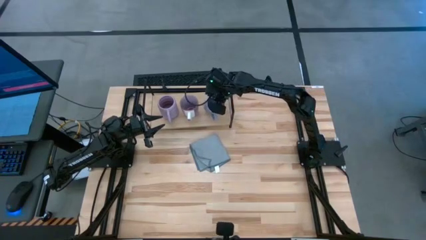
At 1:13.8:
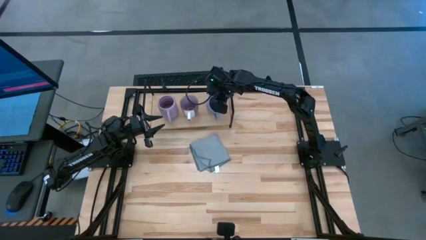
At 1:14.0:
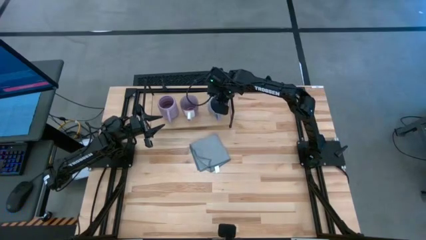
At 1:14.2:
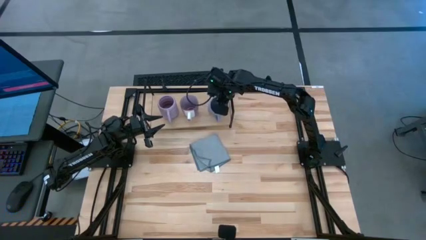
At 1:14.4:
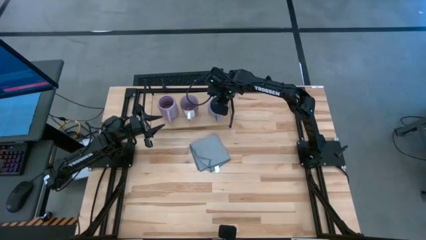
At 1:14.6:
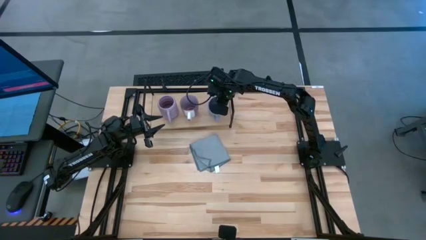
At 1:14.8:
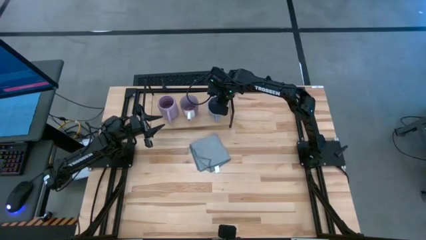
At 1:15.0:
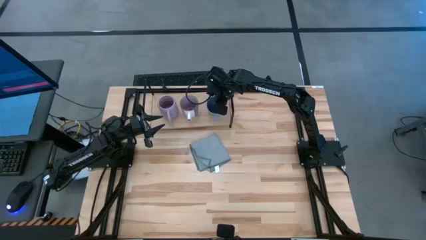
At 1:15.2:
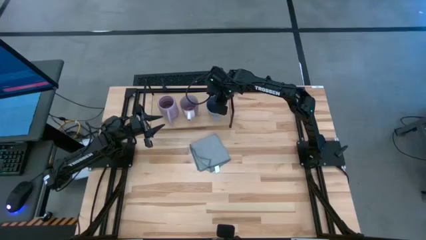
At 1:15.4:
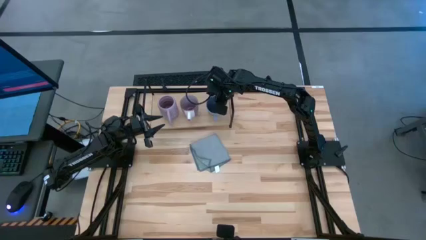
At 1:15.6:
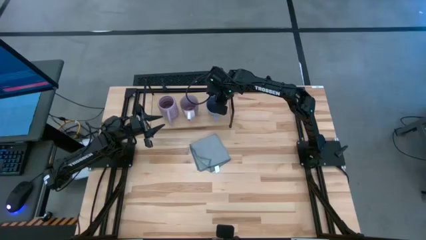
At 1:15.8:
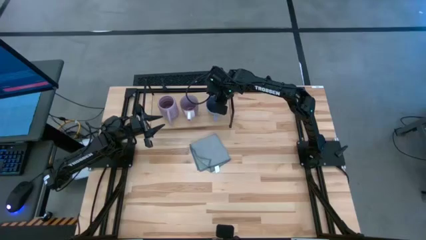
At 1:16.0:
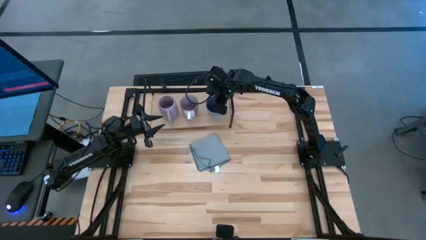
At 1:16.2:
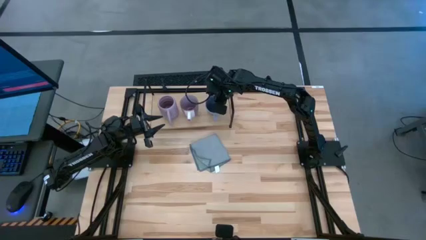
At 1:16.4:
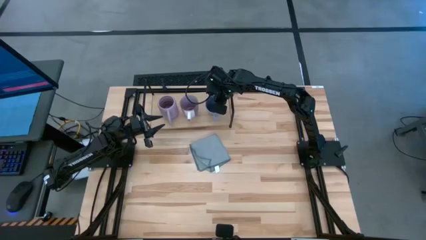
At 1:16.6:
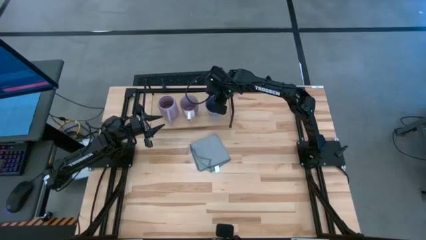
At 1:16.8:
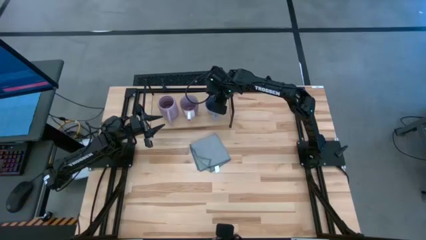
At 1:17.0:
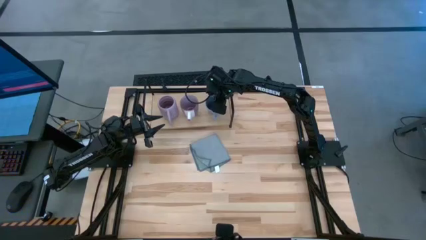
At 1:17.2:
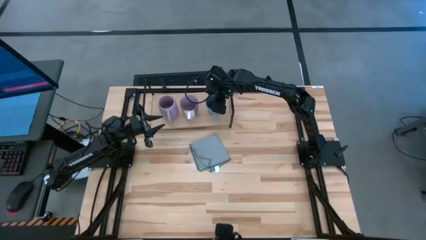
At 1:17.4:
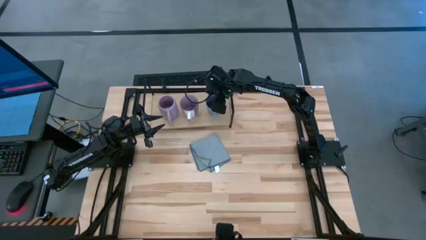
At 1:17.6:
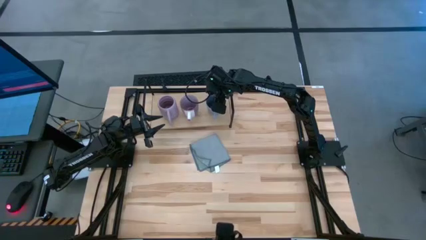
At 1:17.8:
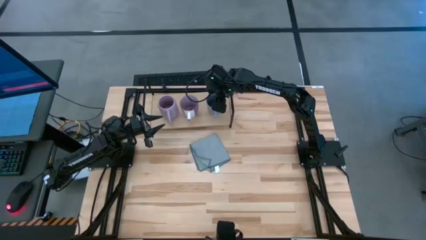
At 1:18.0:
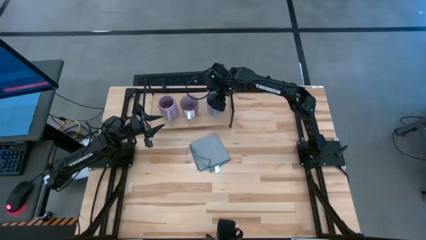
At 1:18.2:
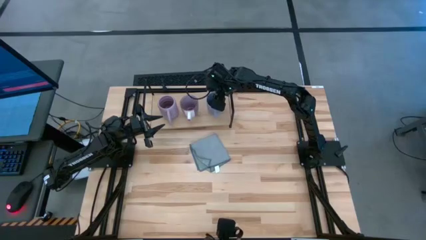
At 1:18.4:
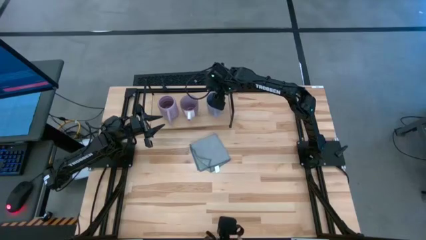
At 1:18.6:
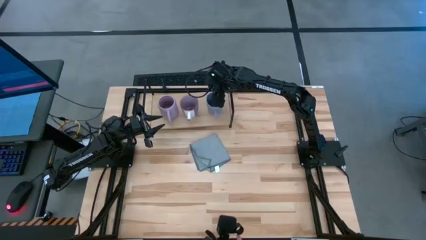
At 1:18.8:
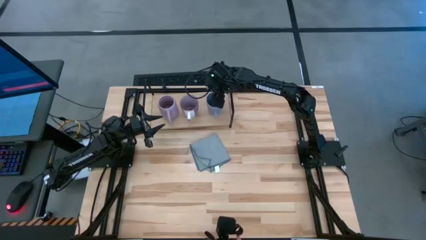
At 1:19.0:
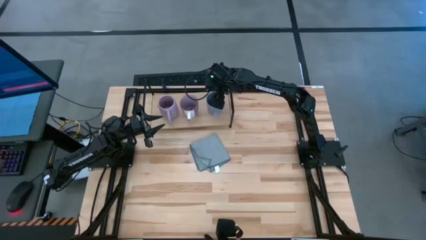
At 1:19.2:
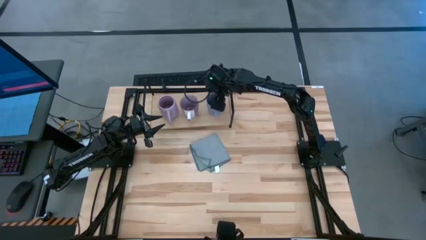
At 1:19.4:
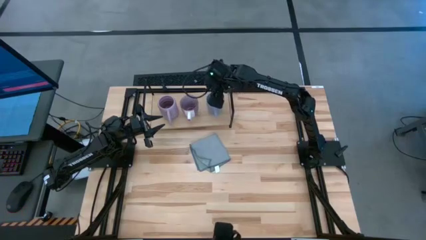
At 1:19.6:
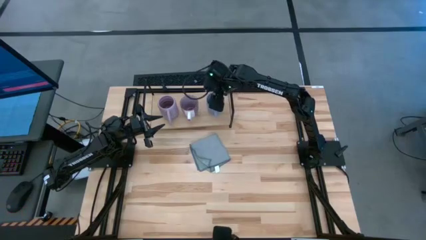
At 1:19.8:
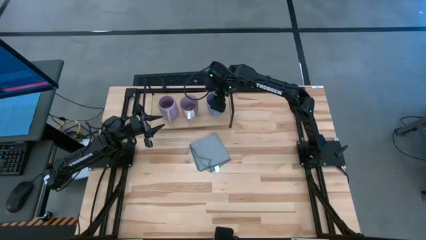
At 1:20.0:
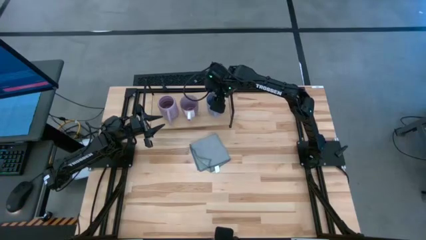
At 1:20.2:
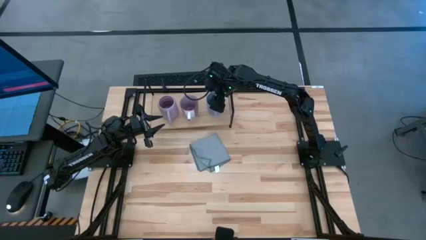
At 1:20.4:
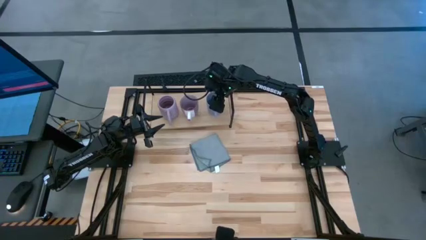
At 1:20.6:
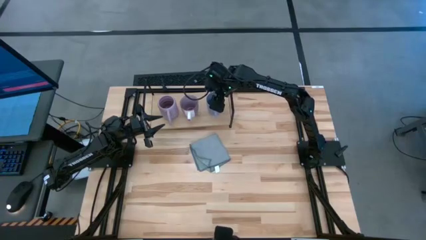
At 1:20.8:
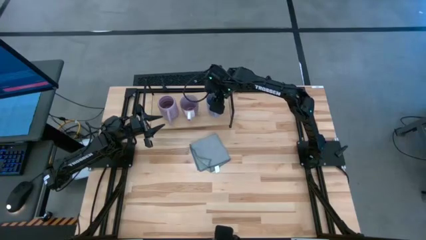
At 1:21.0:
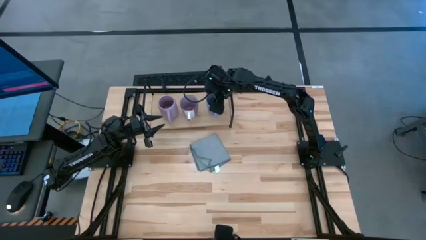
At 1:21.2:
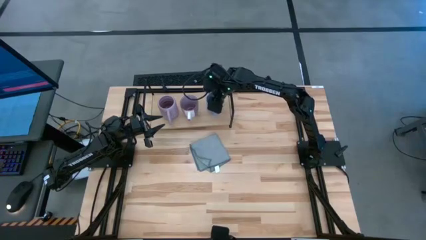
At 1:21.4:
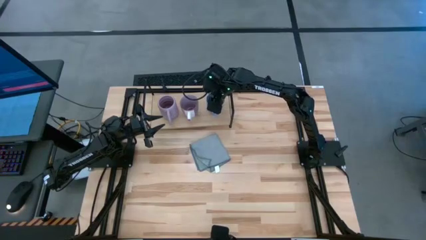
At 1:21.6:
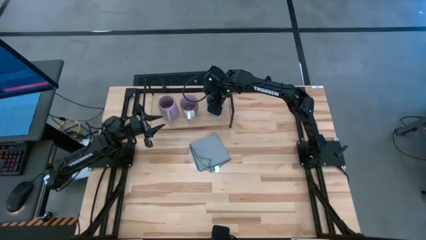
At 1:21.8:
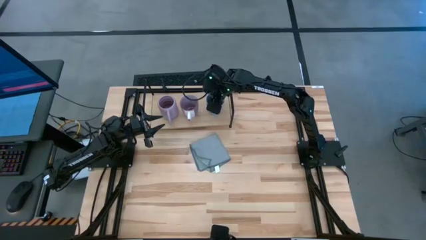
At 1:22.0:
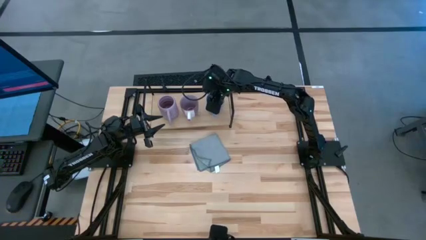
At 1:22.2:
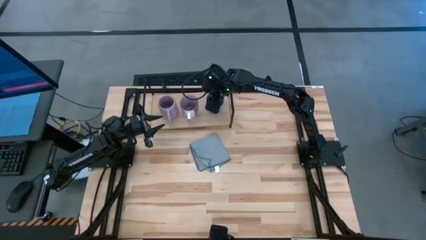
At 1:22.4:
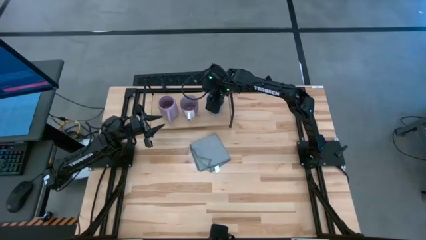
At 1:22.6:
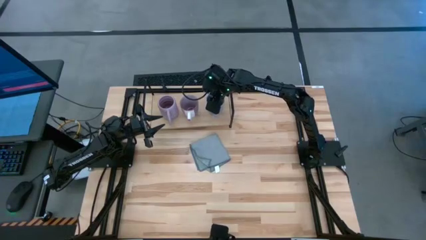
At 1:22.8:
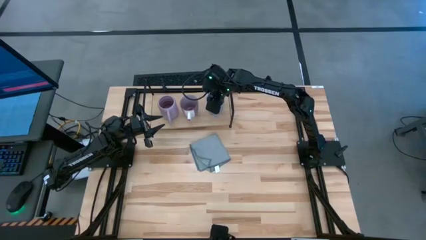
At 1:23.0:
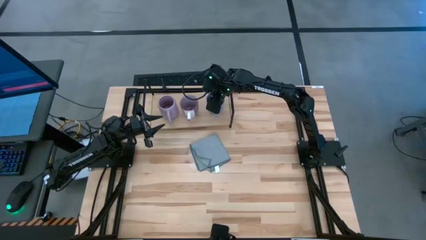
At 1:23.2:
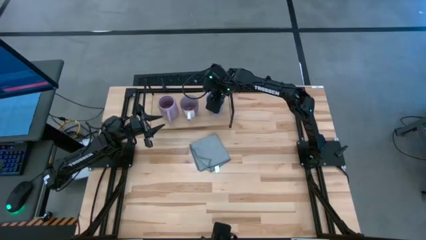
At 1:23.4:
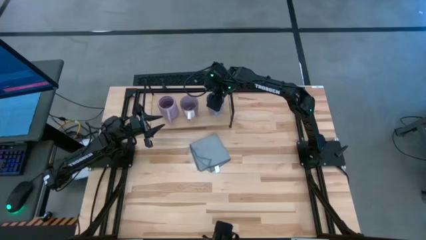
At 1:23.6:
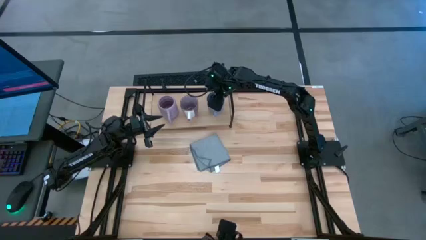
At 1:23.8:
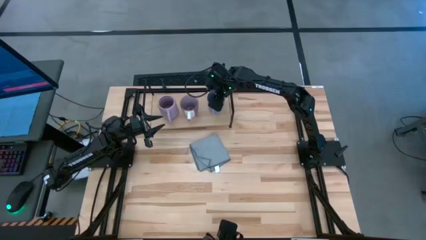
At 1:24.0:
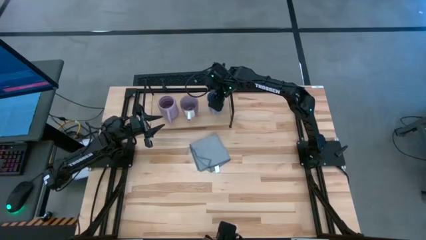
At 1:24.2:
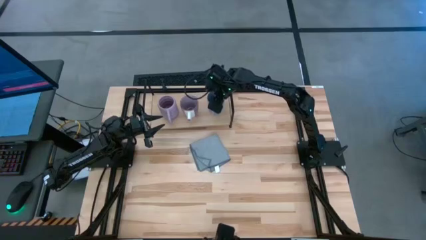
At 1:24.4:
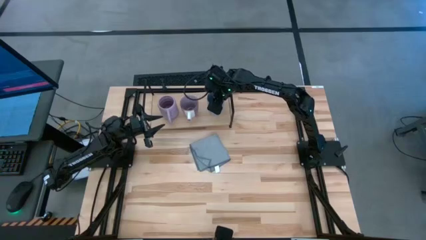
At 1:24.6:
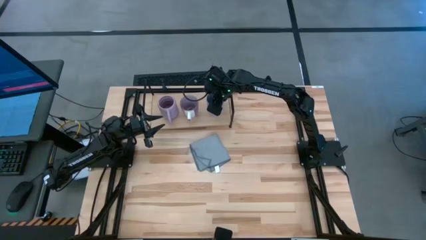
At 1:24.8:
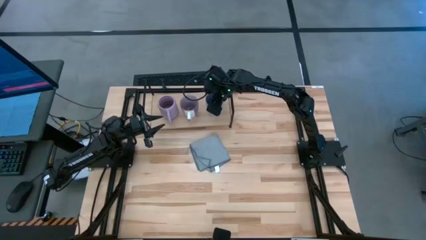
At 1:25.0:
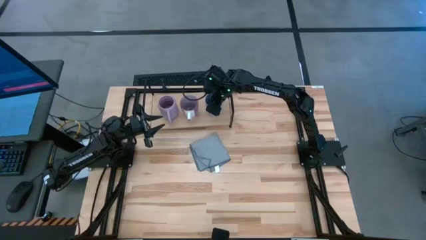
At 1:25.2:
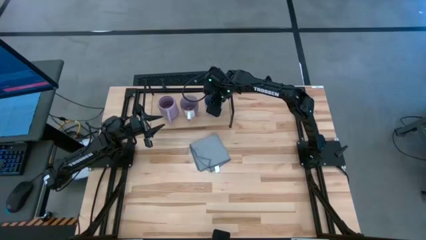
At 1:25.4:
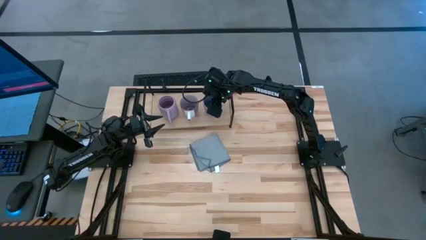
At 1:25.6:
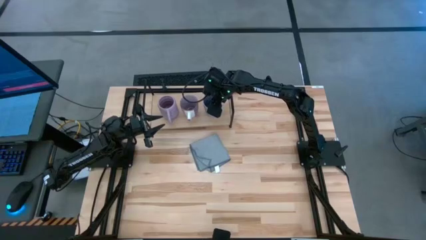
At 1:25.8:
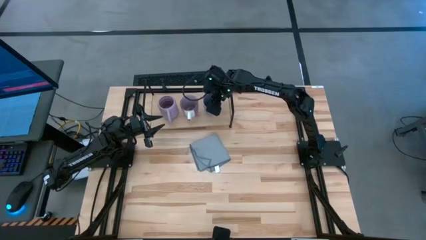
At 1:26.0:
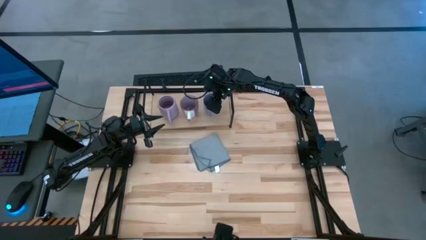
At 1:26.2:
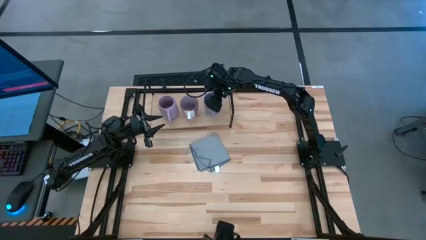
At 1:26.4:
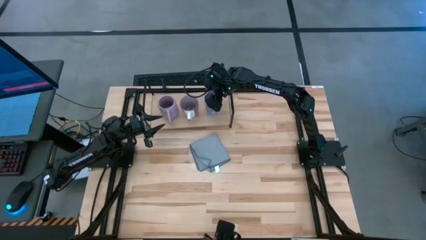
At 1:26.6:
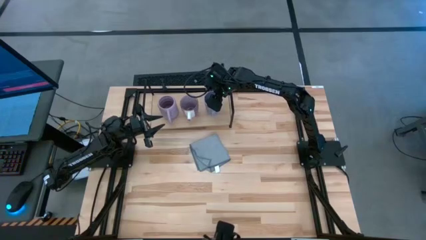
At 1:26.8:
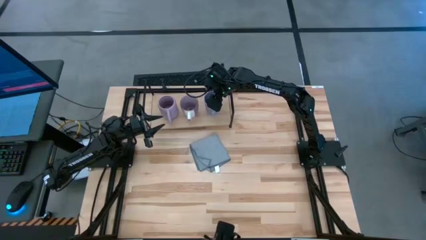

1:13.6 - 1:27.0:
Task: Stack small to large cups/mugs on shelf
Put the blue mug on the shelf
